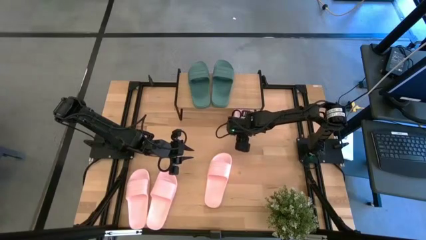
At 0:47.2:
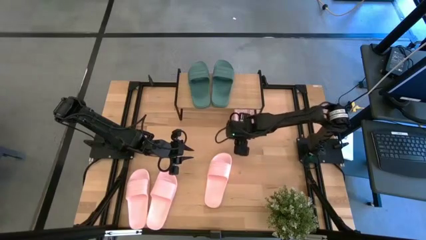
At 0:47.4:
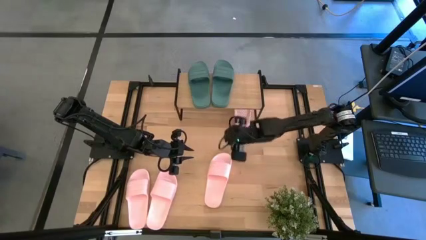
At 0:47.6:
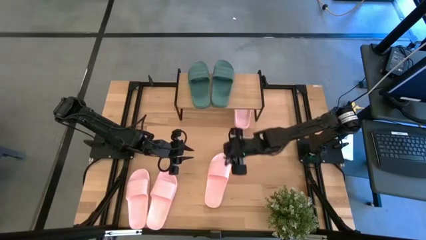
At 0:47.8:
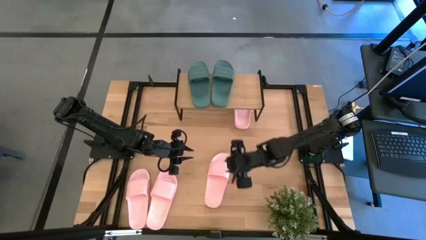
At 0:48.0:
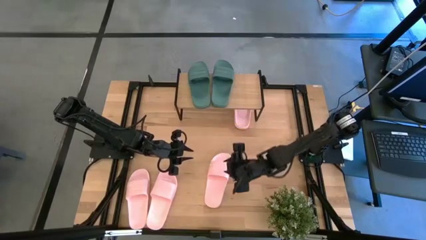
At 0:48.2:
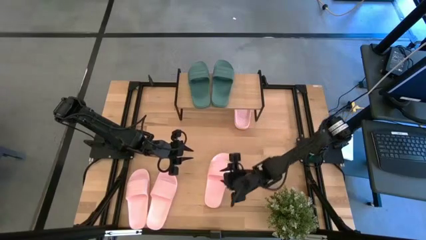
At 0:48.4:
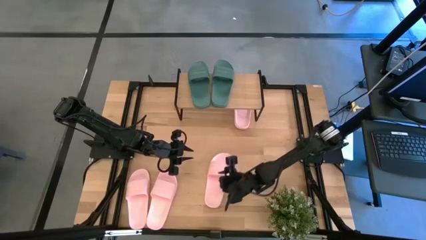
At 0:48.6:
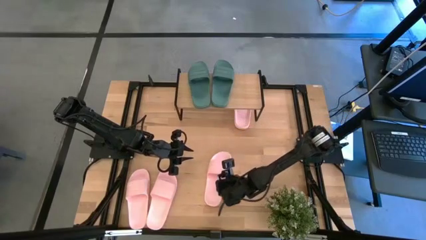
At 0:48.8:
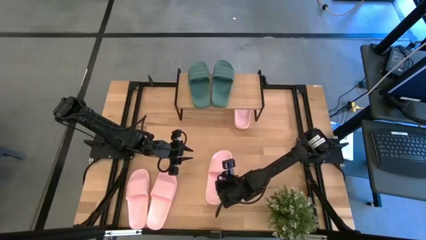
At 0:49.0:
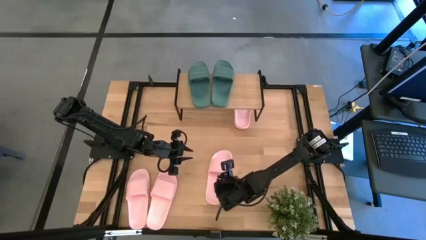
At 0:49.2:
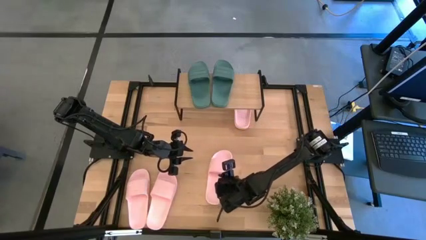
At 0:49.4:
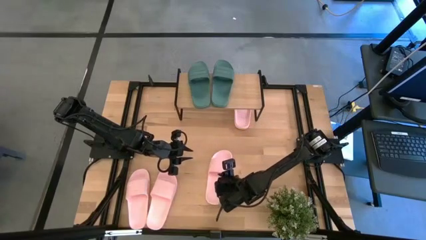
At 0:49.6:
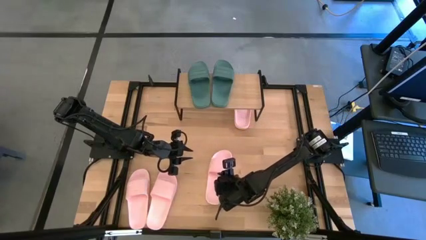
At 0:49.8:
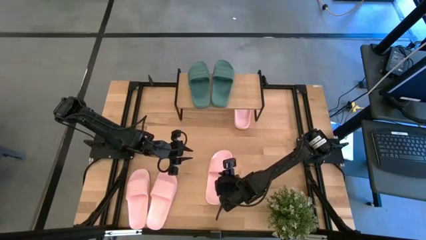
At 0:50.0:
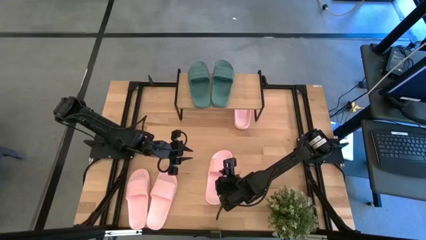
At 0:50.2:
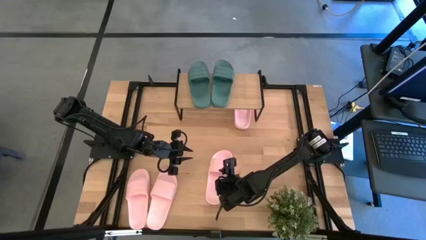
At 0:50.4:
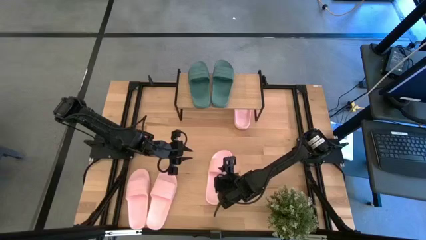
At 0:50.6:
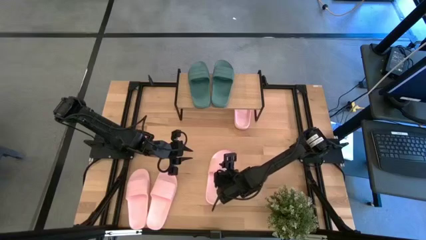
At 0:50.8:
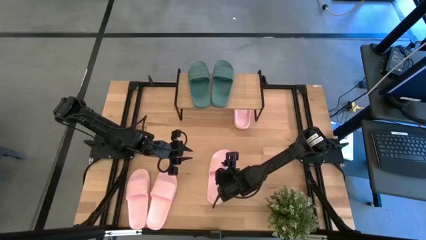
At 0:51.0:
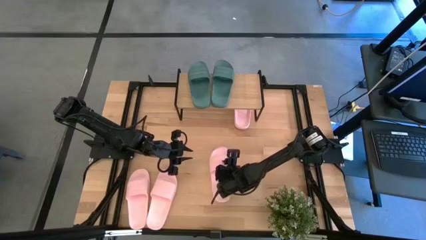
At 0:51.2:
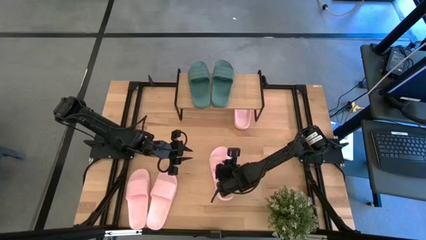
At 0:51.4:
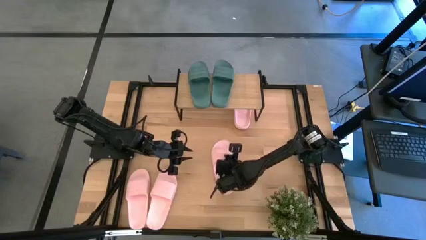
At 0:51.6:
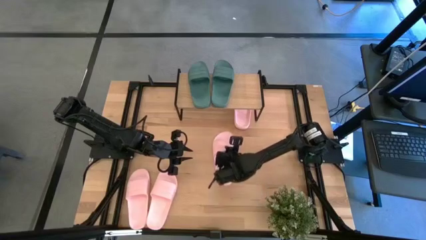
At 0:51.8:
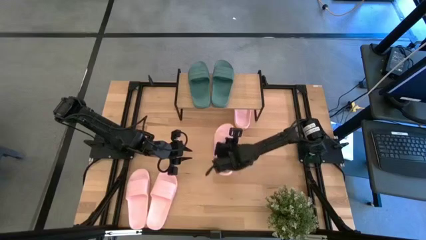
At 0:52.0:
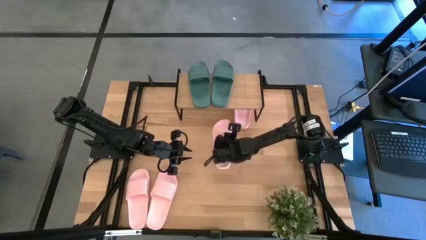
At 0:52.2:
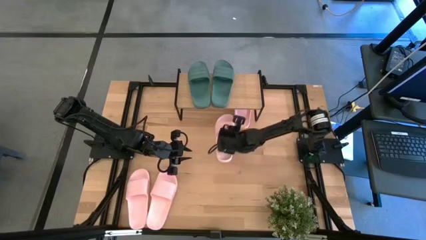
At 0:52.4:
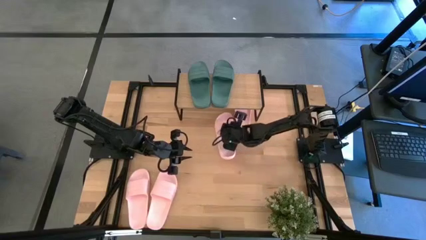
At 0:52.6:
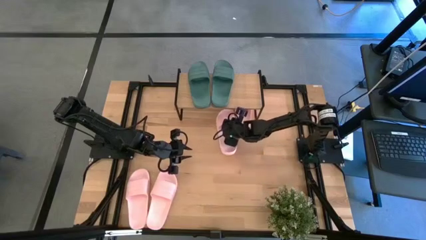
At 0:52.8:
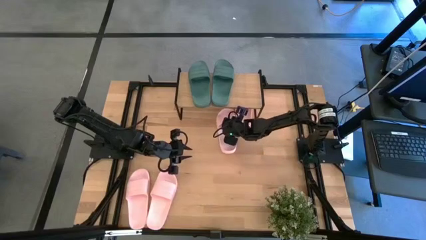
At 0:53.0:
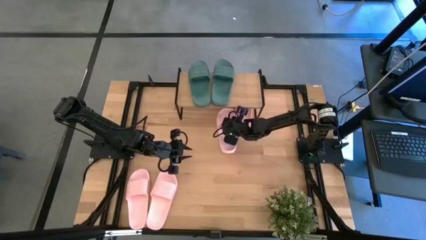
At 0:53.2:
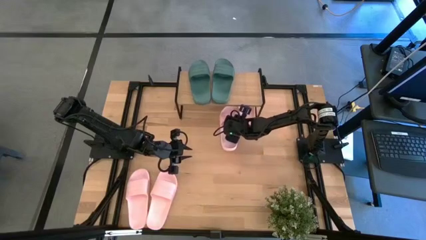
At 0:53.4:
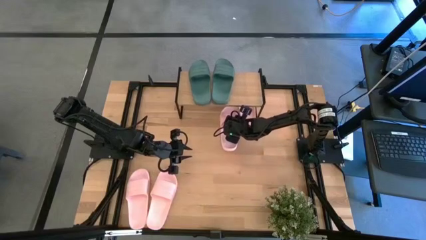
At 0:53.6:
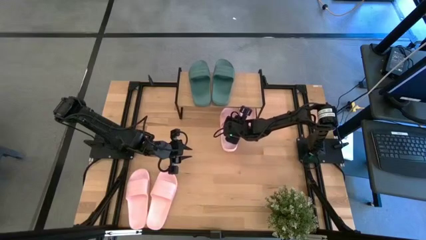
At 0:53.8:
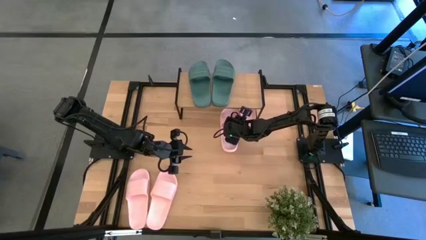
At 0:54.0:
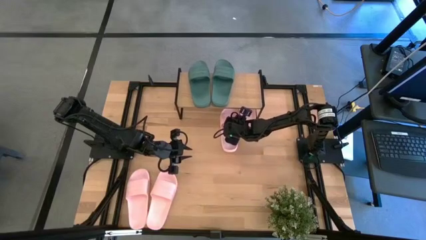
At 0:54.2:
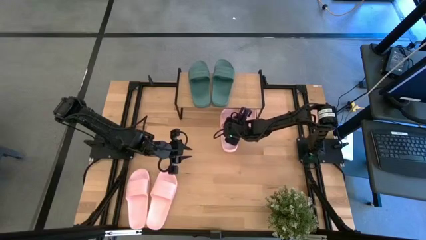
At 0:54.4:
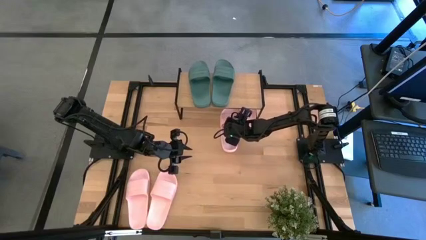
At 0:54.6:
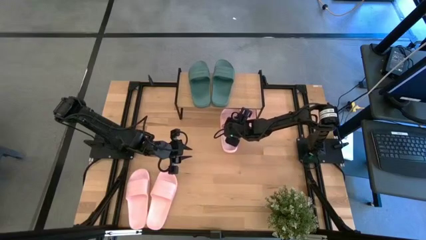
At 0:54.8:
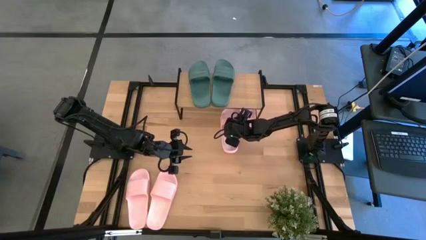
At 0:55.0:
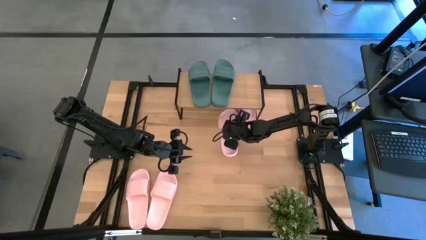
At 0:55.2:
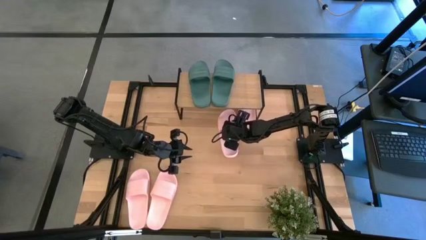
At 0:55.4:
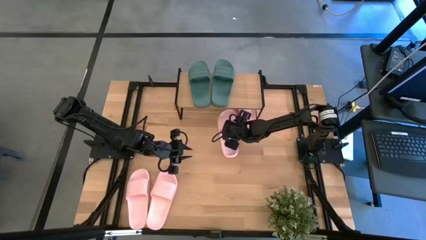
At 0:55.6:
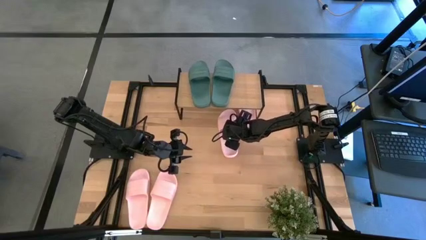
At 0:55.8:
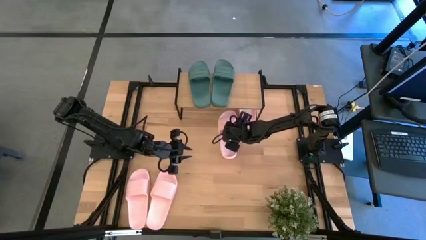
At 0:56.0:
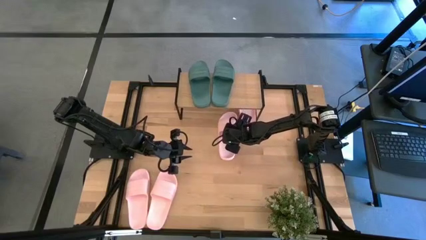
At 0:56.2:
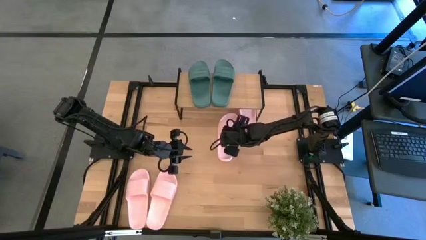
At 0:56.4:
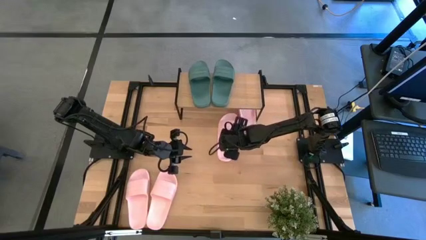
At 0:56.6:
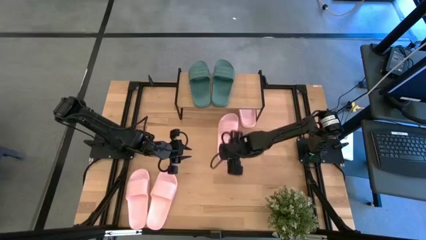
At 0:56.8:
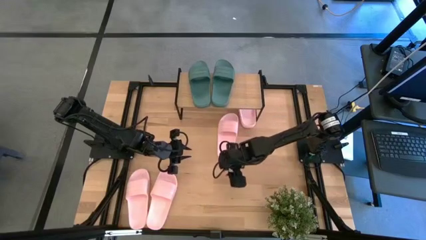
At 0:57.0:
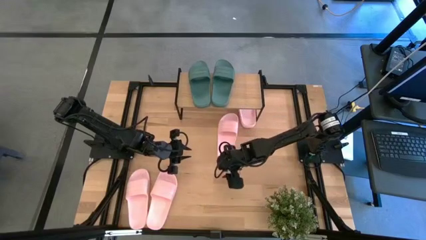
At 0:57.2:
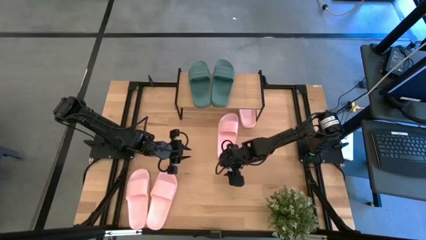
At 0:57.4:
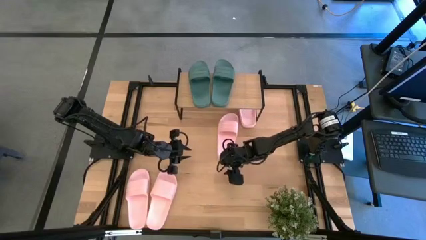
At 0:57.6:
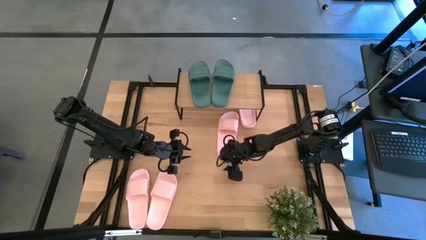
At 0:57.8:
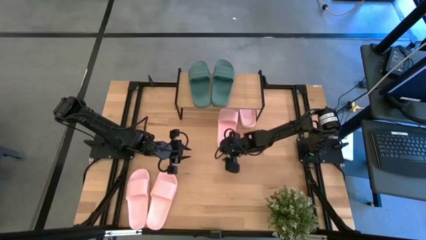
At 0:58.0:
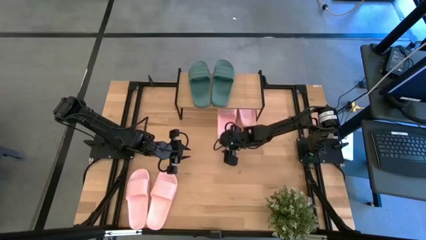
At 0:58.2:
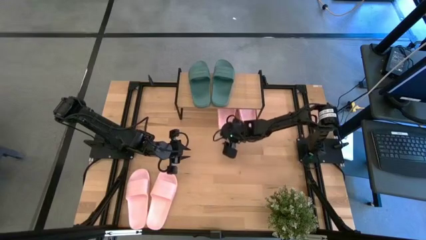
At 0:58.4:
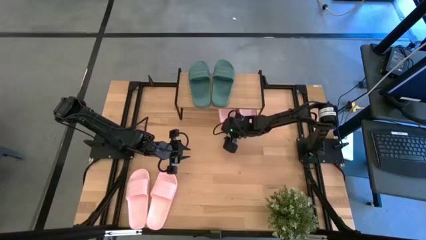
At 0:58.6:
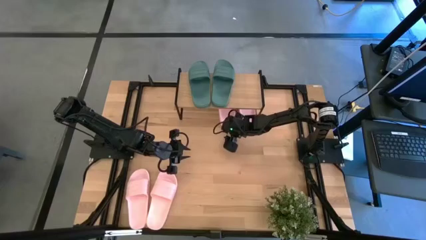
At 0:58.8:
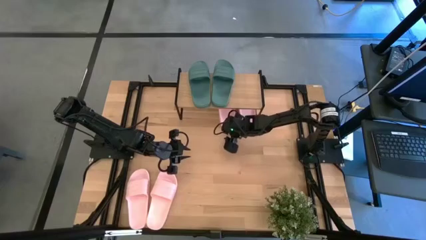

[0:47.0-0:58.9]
Task: Pick and place slides into the shelf
Put the pink slide under the shelf

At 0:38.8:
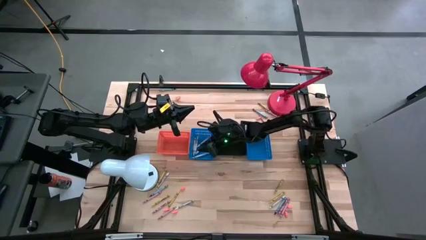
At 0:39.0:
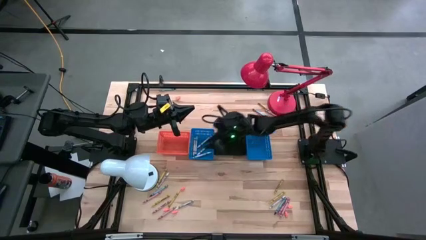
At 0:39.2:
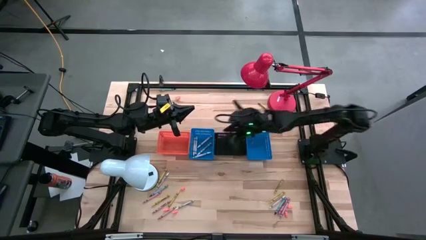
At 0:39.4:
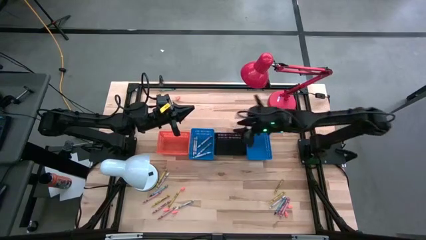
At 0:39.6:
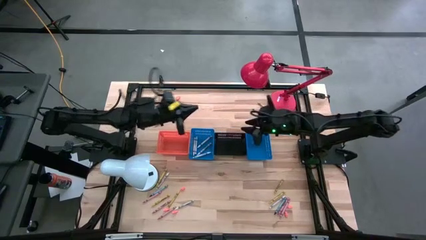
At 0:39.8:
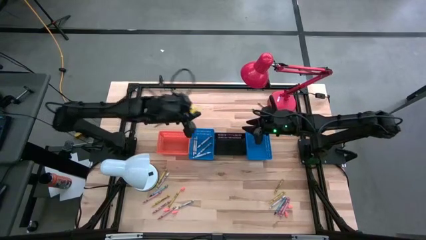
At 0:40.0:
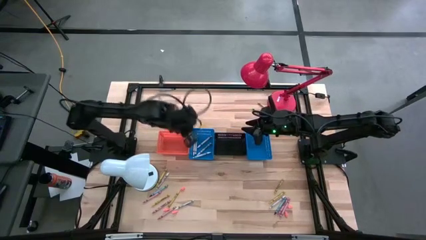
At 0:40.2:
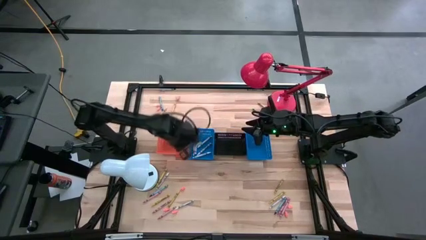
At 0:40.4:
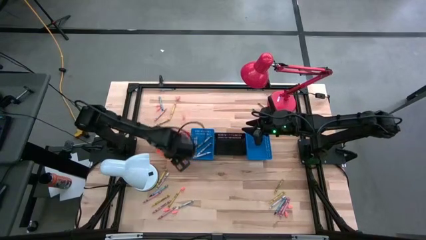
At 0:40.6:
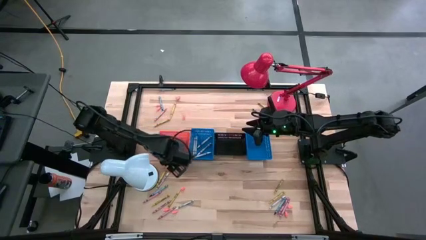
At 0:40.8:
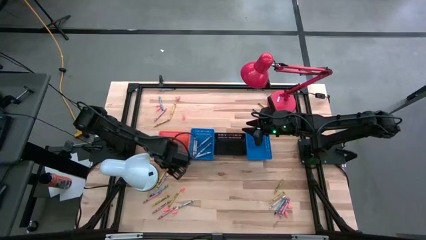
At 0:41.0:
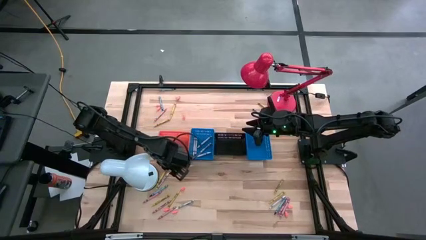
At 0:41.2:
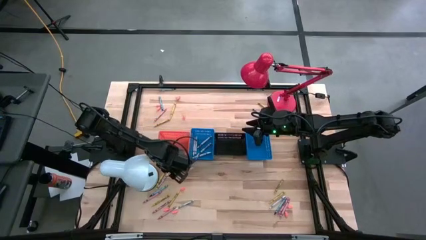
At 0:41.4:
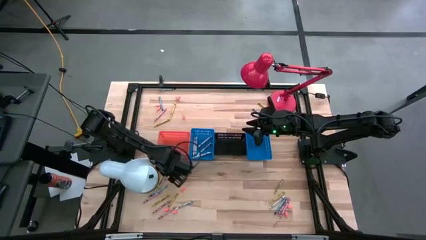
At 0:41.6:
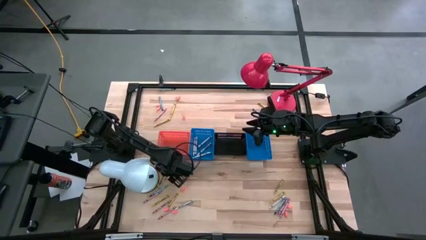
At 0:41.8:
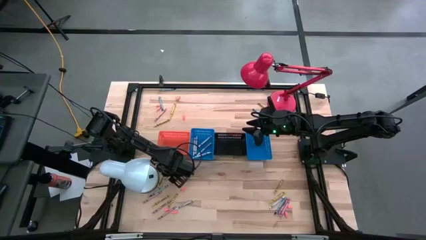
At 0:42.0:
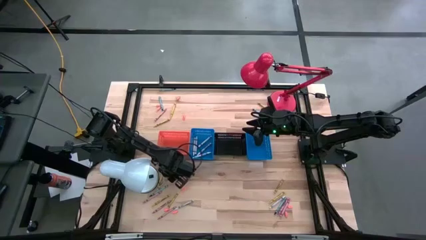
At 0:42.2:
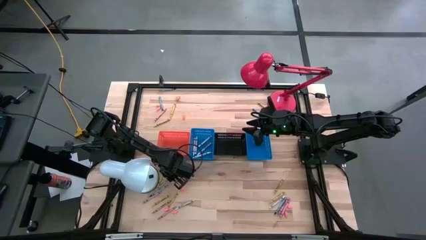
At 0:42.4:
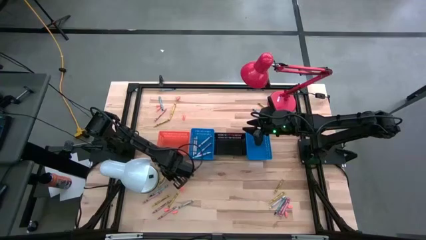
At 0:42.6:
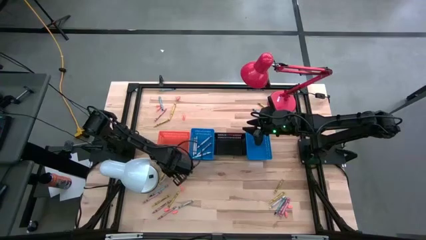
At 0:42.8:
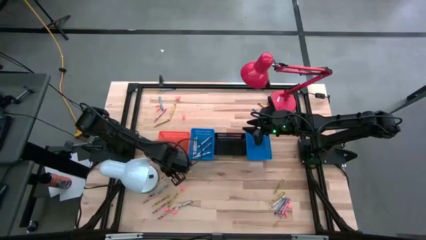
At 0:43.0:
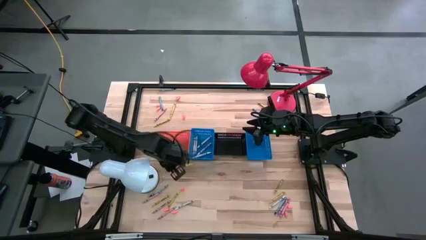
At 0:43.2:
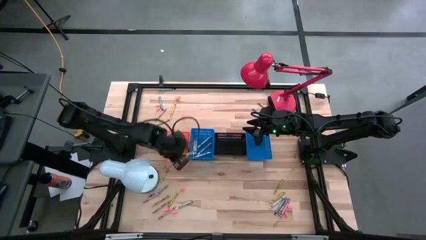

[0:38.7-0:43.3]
Task: Sort crayons
Put the white crayon into the left blue bin
